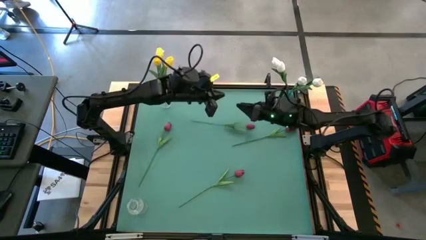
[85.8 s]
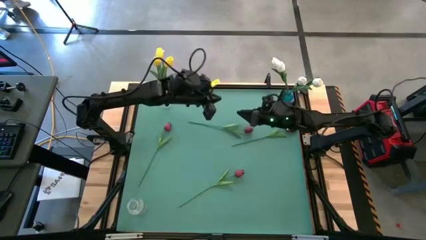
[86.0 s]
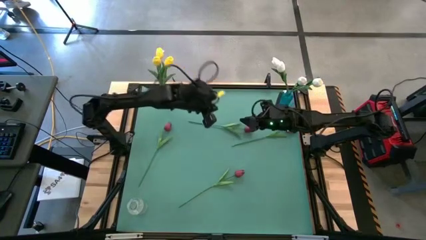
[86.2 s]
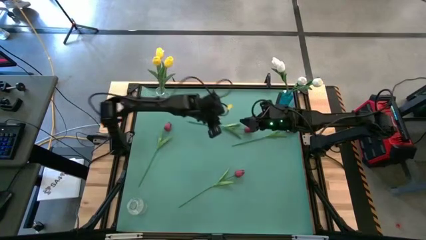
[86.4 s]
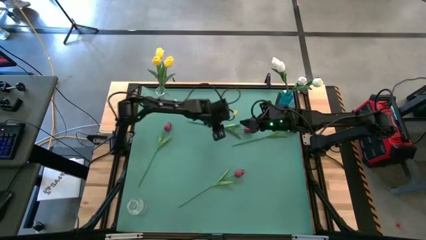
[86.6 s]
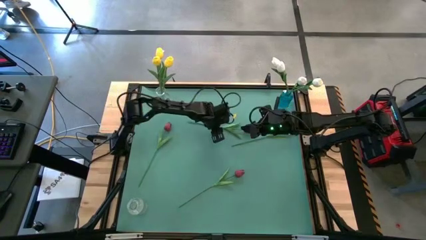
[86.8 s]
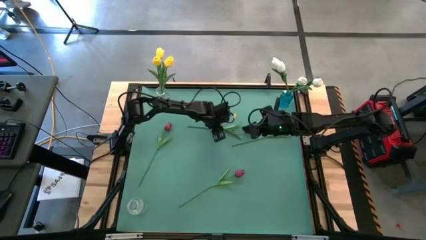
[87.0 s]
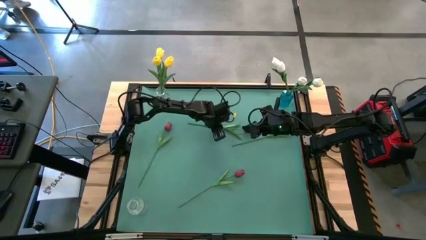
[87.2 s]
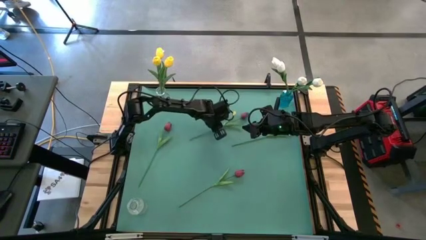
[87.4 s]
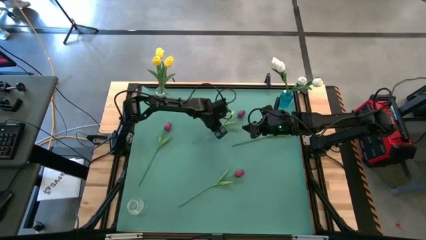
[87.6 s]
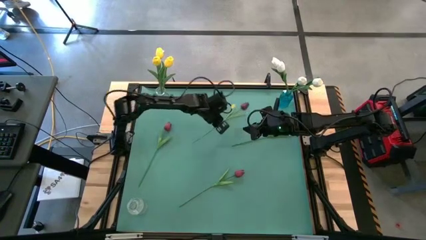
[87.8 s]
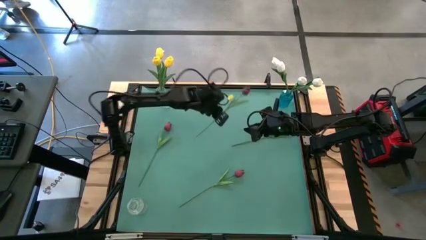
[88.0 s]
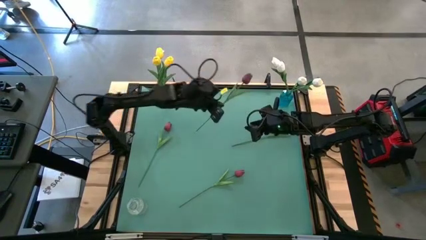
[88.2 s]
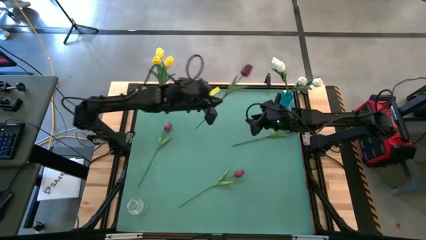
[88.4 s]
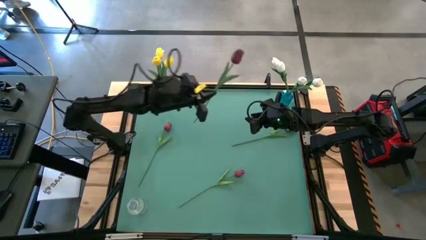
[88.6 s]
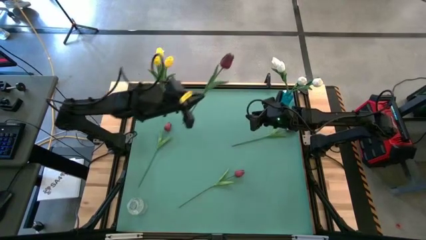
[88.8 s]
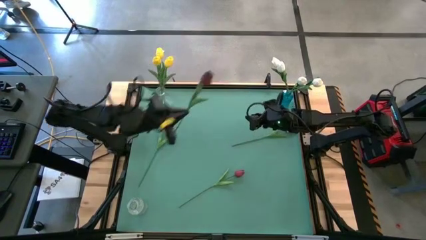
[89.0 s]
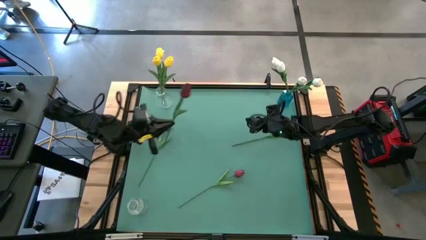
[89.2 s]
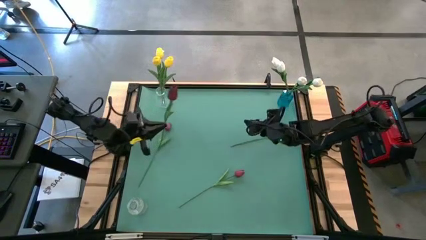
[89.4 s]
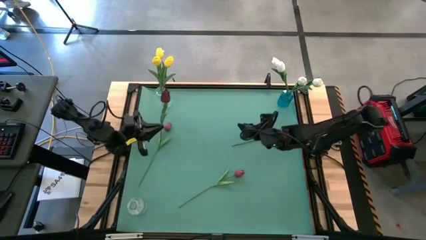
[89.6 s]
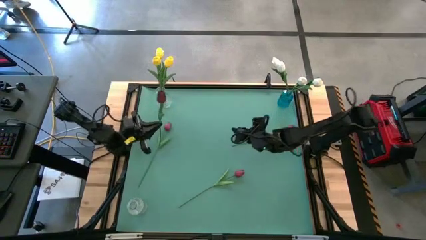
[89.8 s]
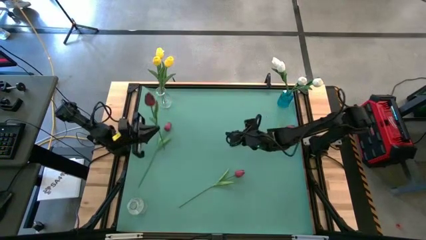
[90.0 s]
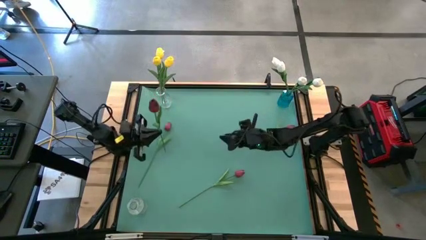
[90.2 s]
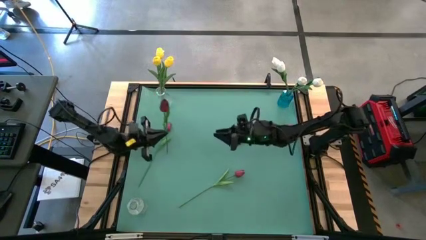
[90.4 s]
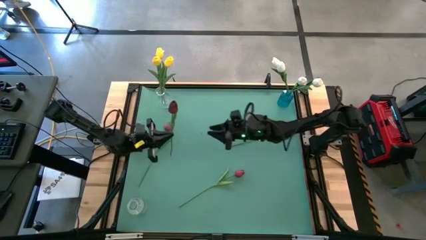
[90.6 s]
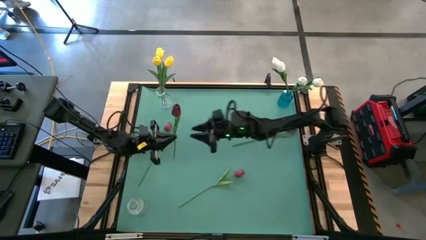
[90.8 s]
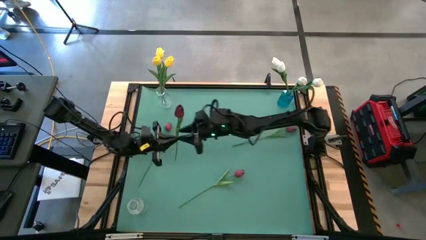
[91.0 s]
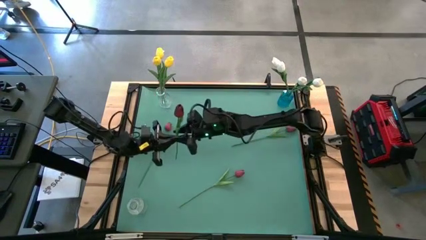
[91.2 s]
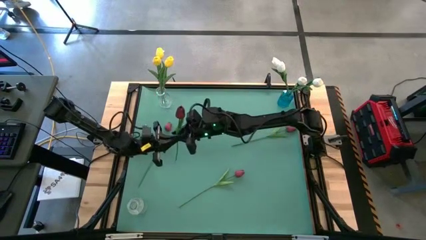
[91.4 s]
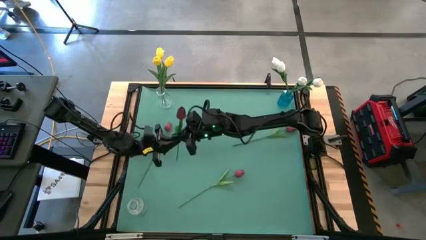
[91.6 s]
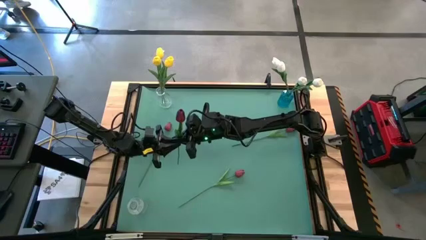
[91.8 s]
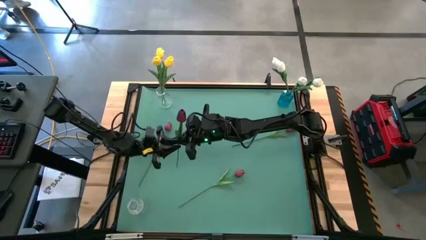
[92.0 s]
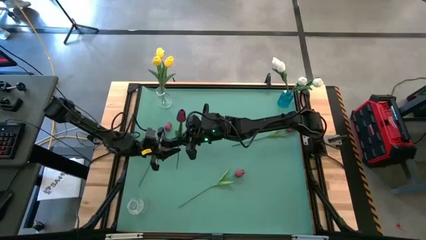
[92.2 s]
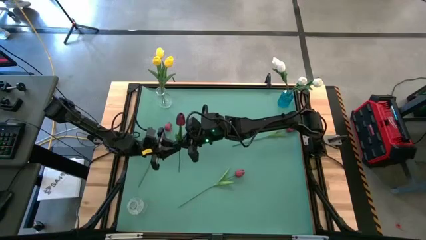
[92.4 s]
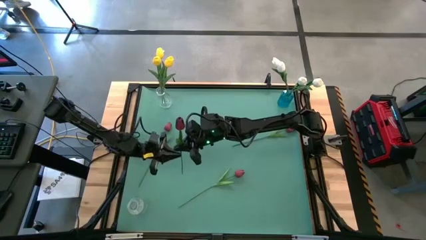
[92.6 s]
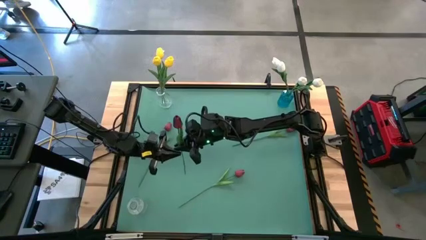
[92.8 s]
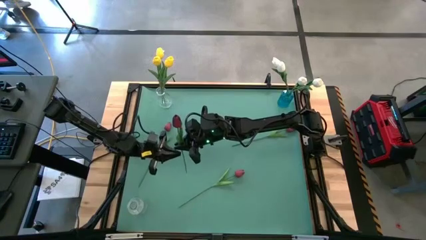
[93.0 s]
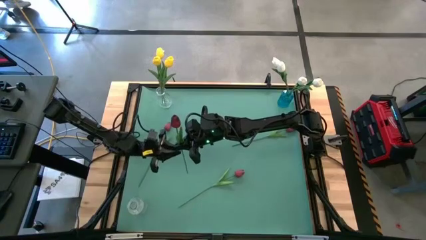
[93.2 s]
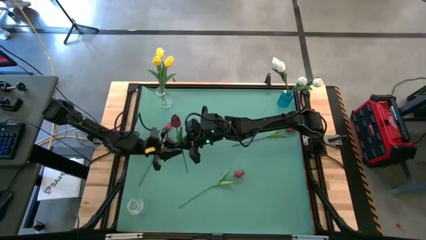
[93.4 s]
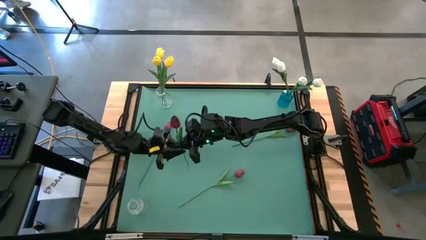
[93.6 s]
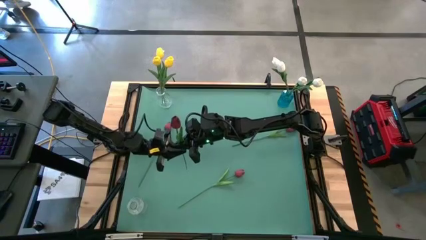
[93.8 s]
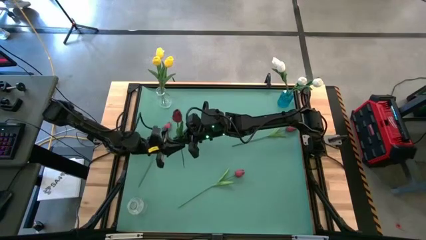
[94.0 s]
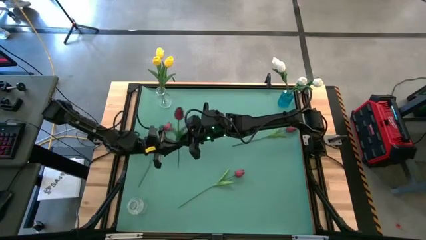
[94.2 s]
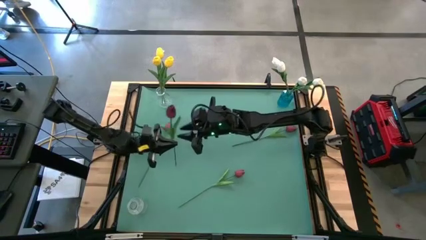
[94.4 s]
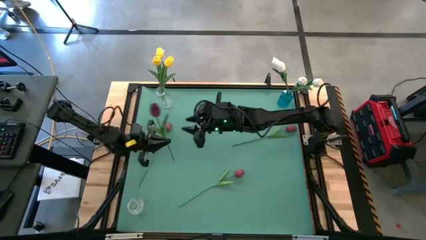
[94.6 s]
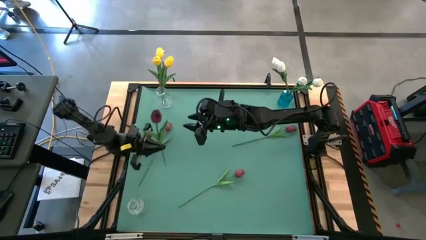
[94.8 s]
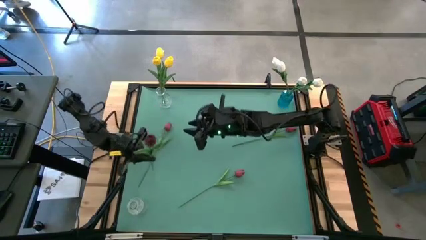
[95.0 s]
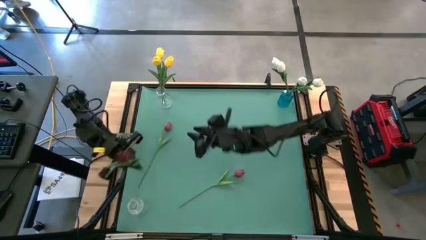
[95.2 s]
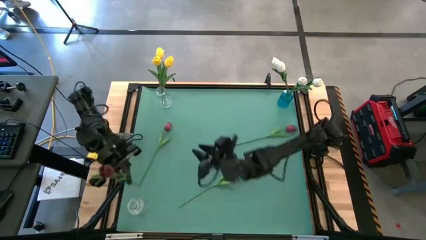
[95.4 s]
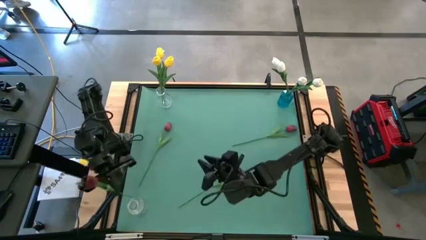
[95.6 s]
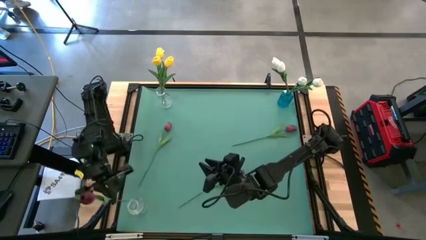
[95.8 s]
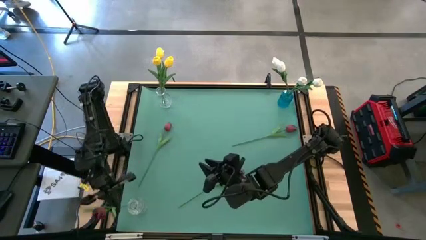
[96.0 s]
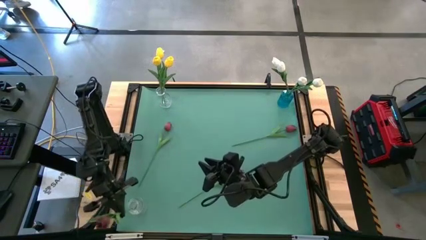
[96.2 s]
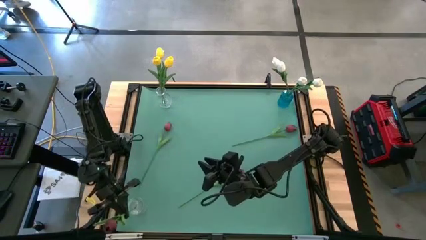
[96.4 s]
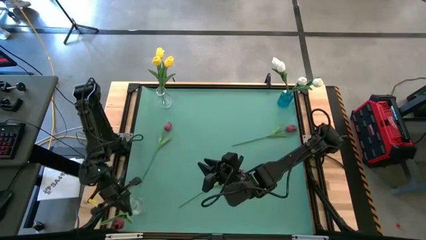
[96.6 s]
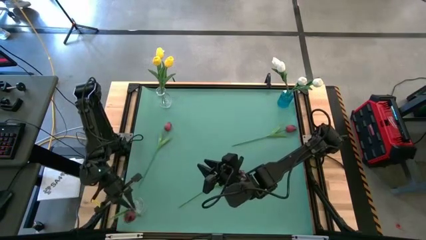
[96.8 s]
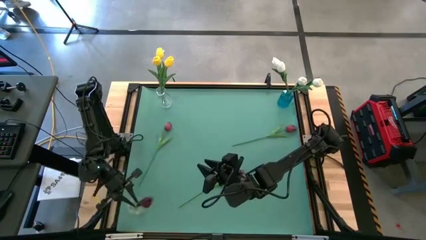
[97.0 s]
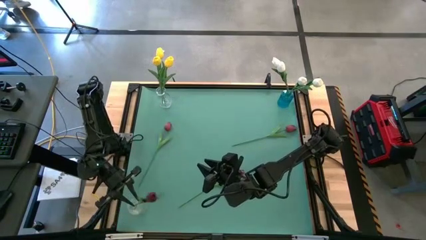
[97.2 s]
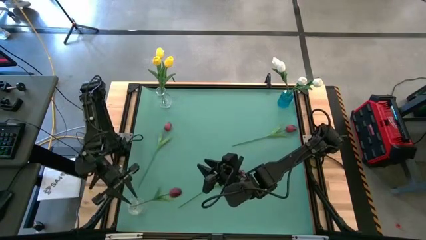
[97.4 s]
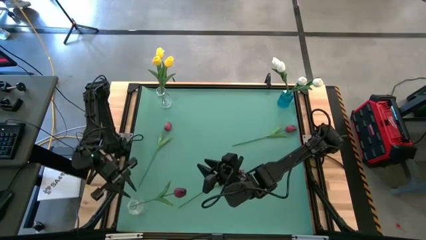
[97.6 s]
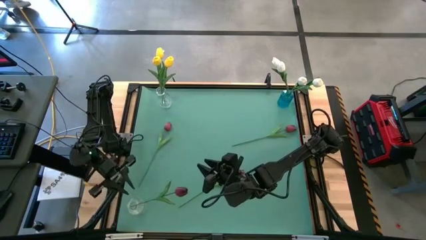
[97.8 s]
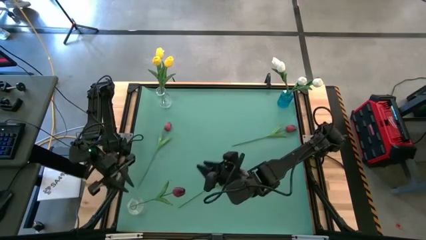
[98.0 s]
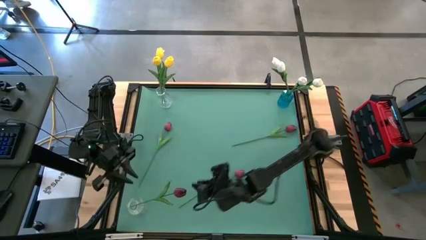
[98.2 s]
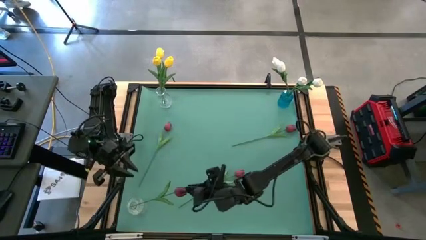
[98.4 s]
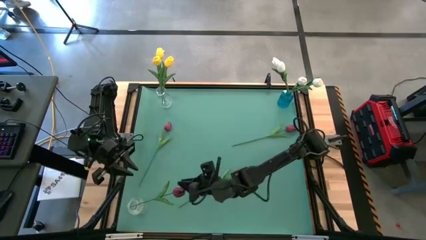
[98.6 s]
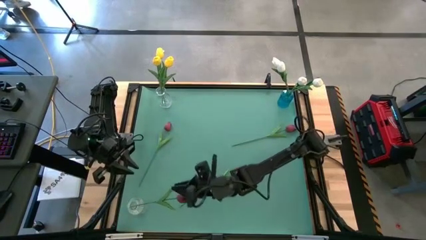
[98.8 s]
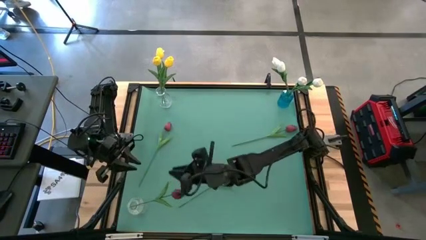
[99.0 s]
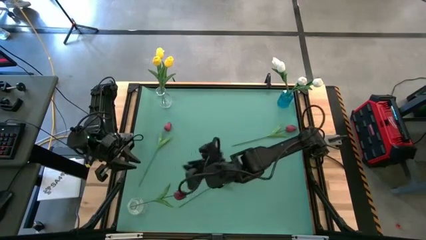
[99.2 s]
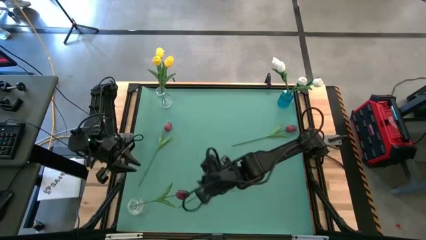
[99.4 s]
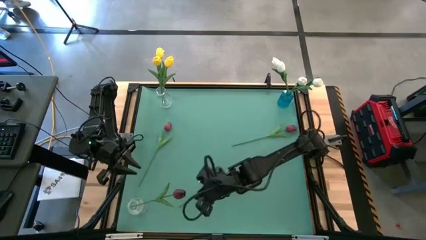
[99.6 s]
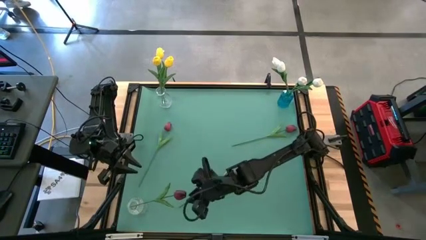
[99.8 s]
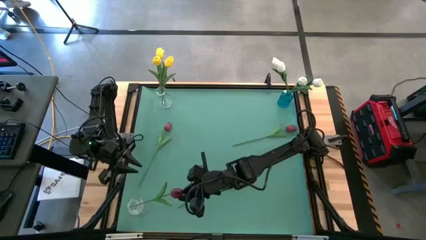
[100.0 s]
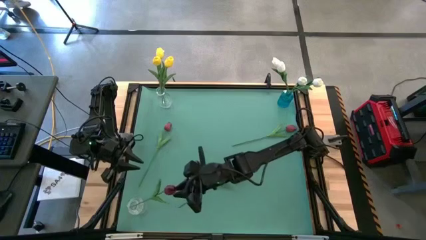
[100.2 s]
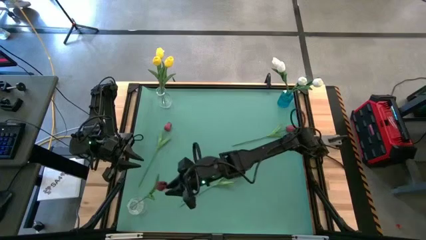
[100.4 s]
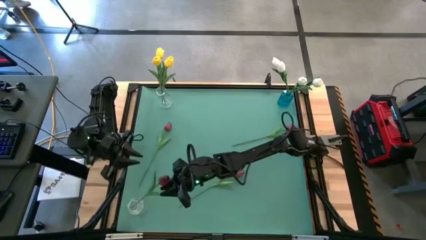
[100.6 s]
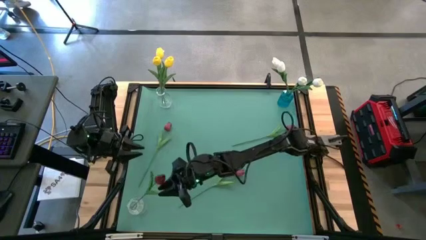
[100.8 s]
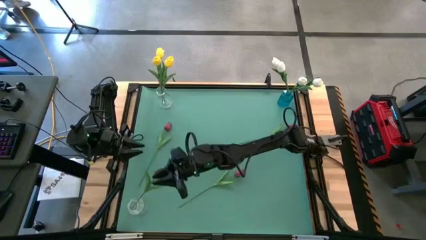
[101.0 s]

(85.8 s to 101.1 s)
Task: Sort flowers into vase by color
Put the top red flower into the bottom transparent vase

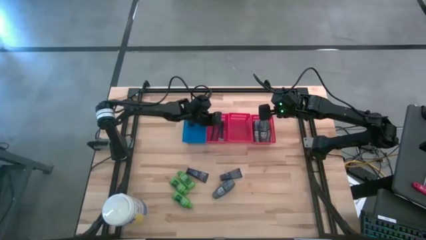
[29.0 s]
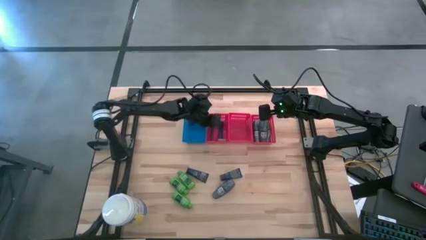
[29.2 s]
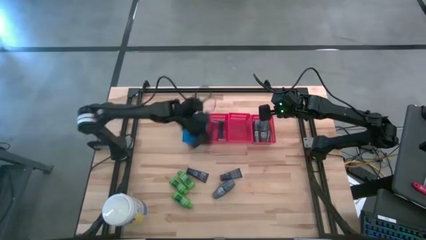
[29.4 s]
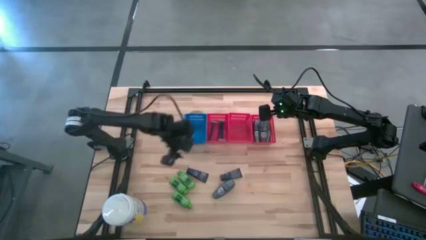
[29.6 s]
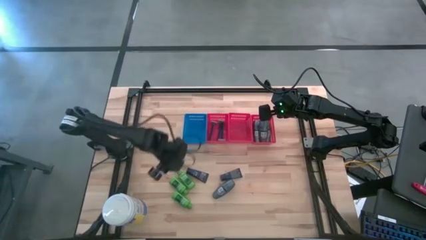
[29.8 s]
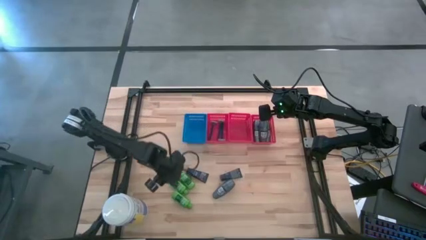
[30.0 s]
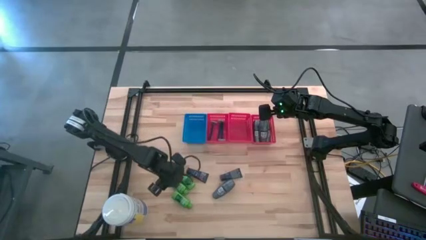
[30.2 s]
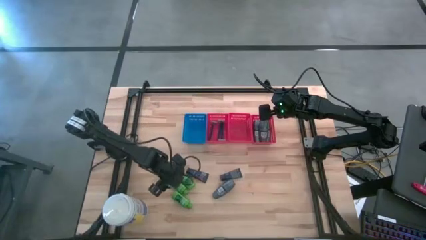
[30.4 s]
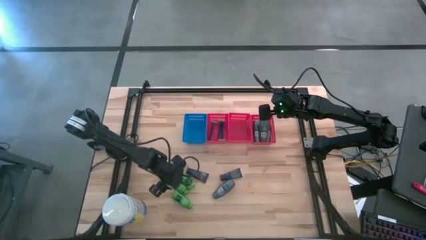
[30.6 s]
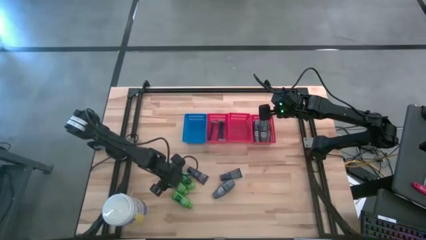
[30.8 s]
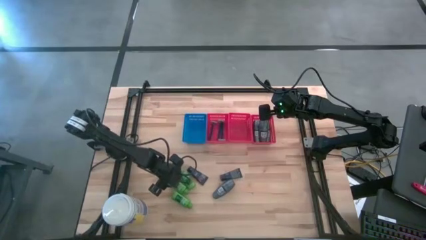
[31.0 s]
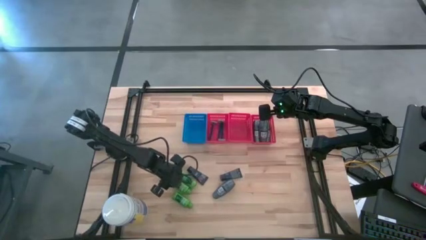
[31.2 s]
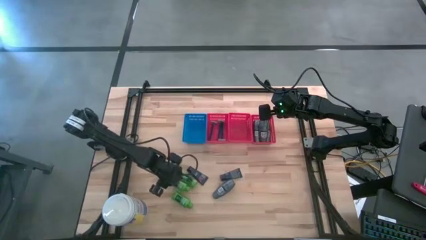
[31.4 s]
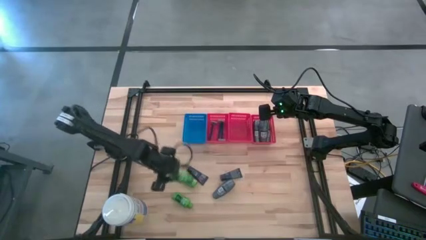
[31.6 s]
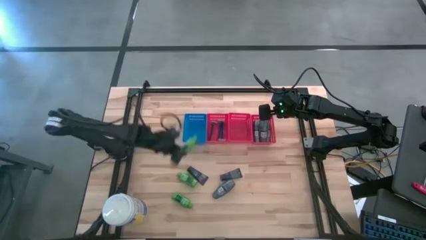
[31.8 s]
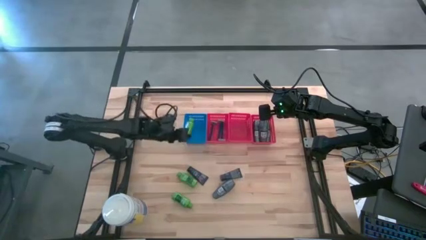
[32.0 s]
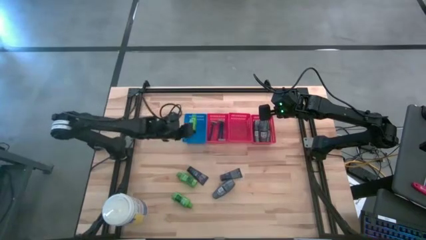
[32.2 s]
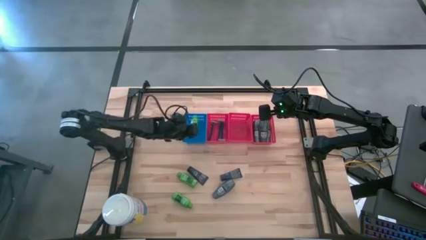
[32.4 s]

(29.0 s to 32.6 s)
Task: Pick & Place Travel size toiletries
Put the green shampoo into the blue bin
